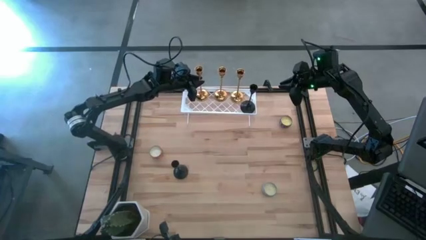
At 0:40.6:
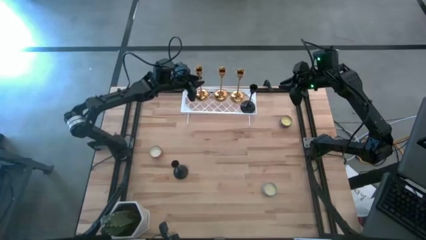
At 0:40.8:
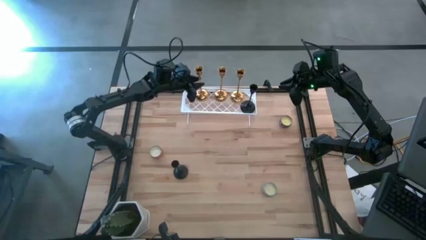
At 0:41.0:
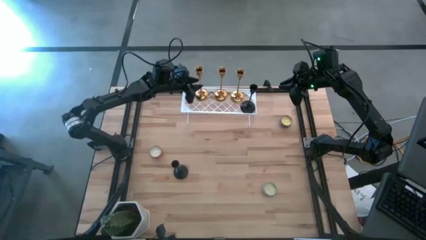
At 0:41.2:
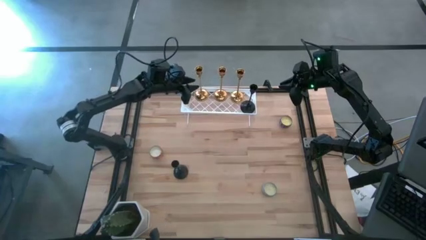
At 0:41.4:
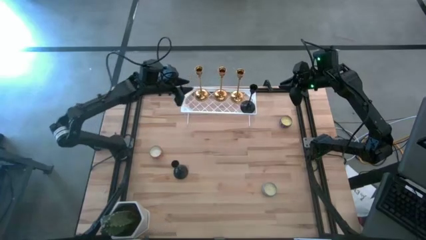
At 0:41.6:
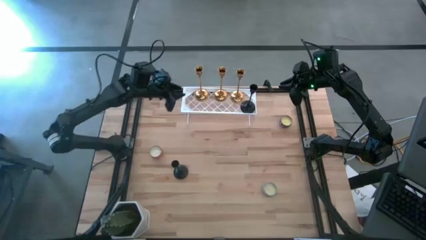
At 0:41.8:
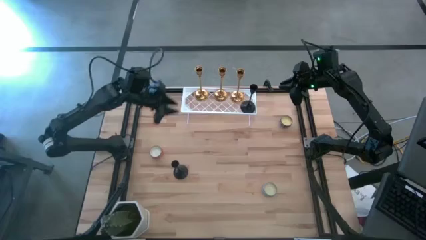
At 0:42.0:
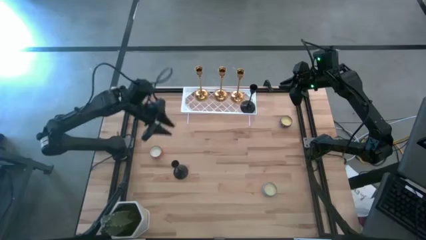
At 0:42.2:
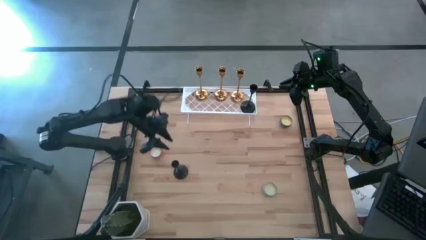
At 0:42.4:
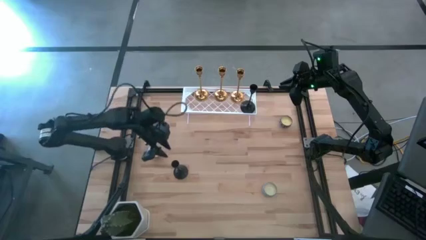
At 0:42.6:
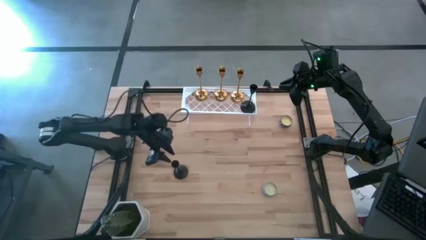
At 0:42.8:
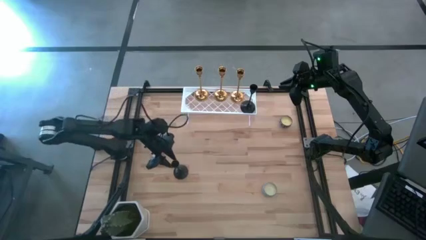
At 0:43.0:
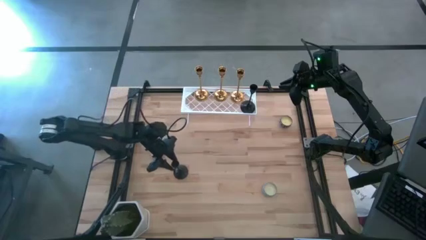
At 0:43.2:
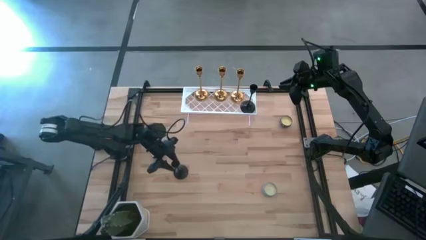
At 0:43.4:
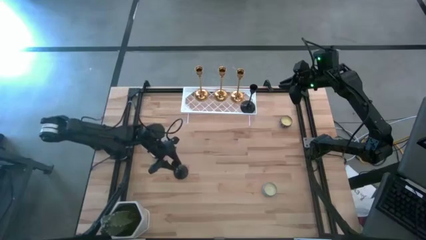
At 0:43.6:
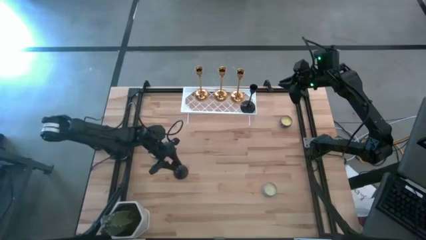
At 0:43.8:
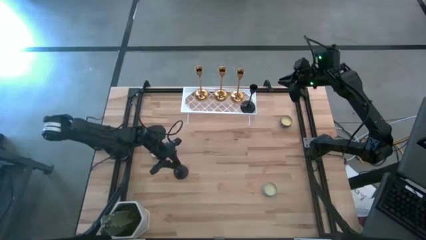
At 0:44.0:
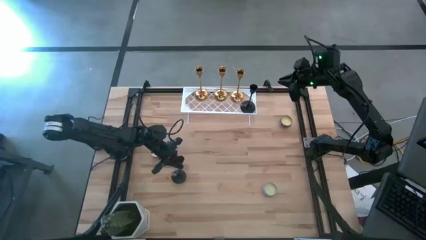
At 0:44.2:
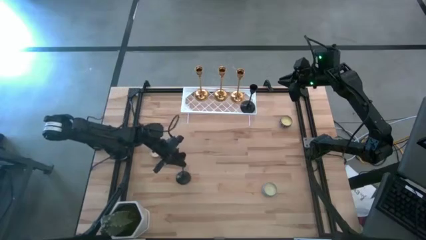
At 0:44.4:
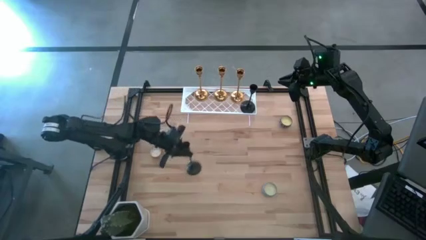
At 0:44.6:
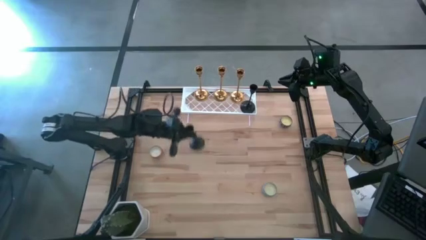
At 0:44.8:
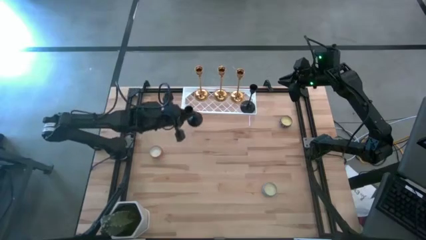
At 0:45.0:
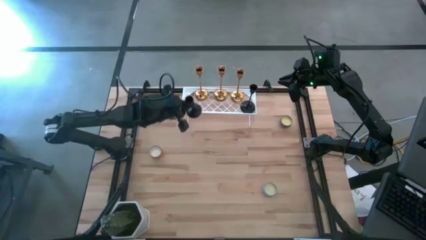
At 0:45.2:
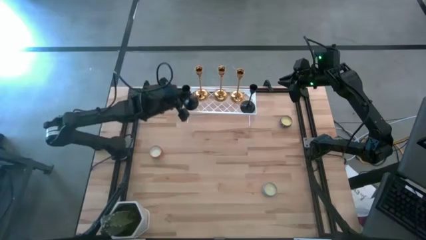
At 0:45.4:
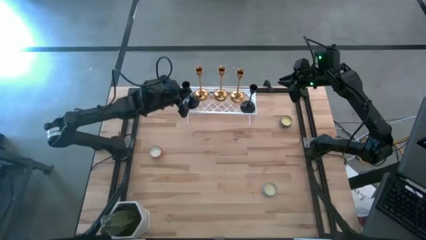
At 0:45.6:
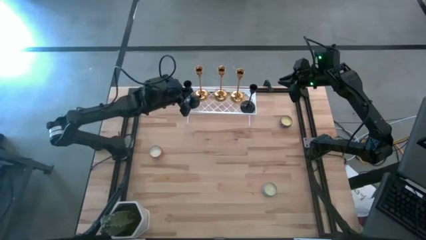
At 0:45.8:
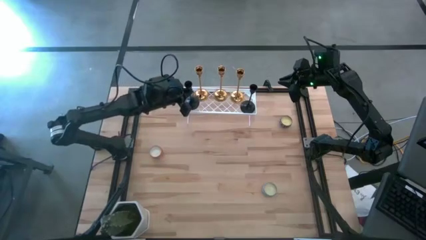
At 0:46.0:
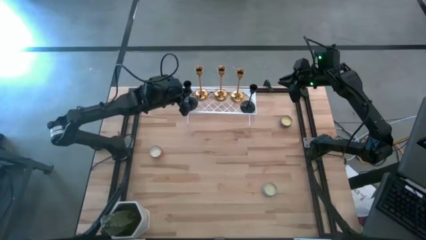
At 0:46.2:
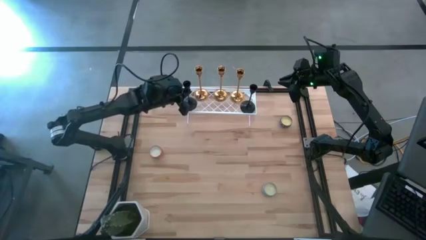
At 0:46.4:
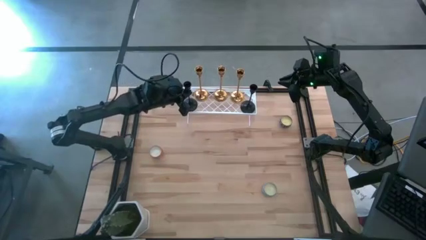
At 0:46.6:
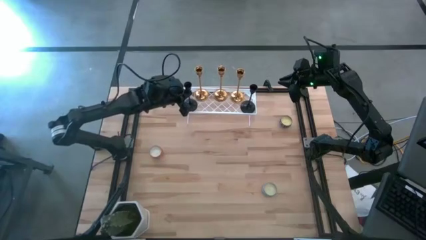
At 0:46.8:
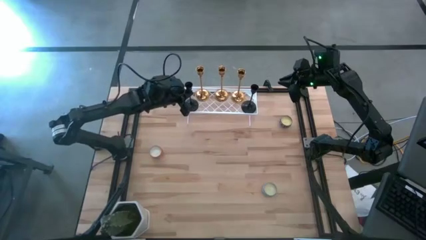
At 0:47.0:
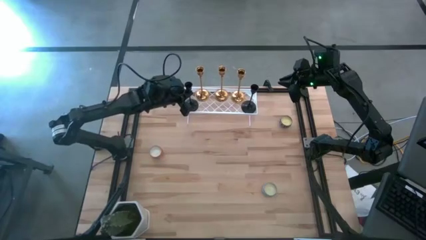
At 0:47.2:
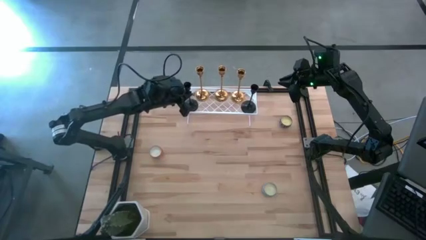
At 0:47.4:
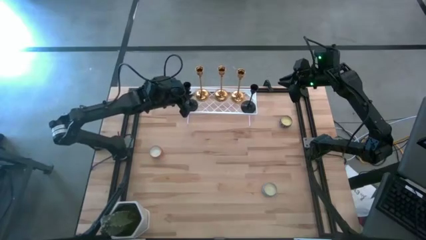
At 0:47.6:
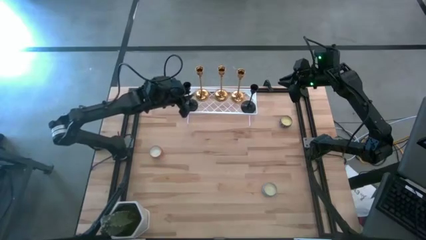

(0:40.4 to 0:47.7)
Task: Pick & Place candle stick holders
Put the black candle holder on the shelf

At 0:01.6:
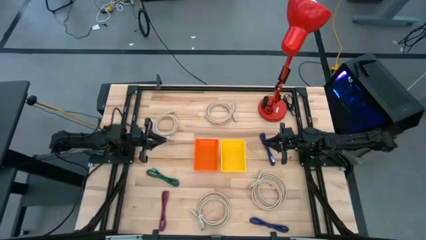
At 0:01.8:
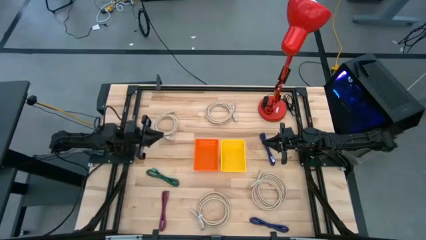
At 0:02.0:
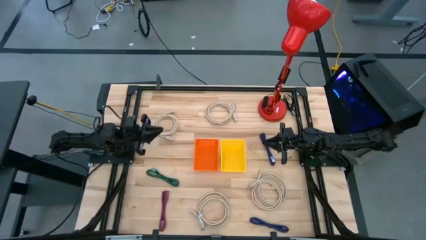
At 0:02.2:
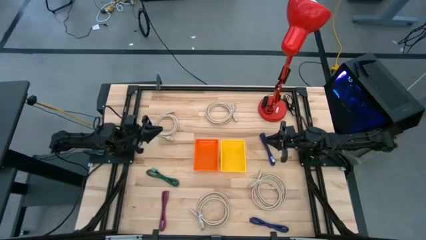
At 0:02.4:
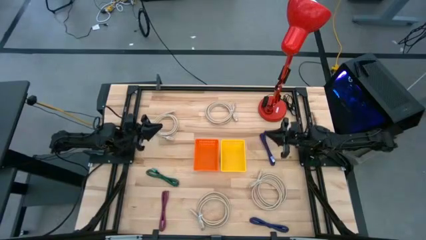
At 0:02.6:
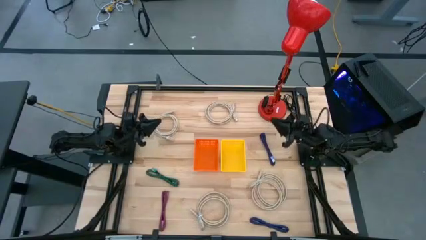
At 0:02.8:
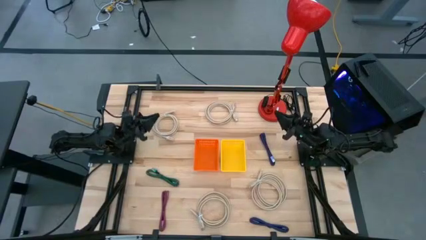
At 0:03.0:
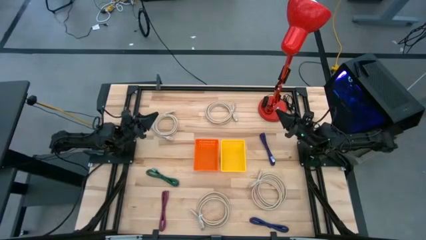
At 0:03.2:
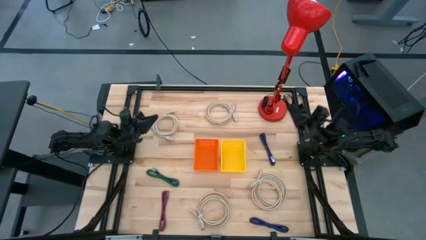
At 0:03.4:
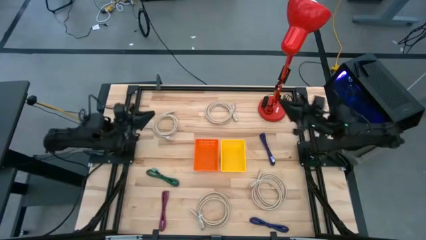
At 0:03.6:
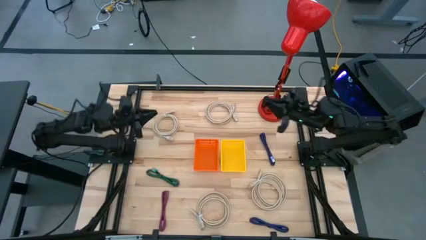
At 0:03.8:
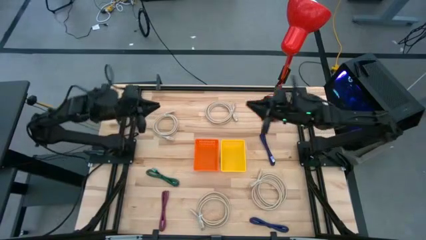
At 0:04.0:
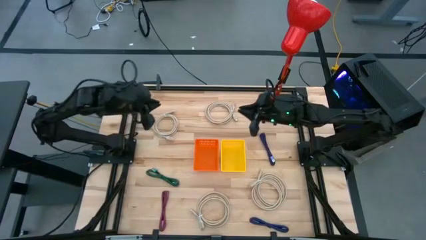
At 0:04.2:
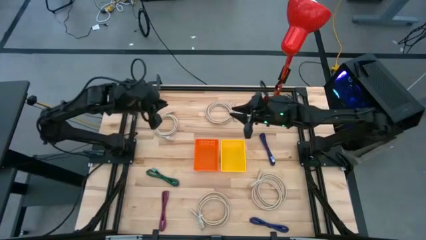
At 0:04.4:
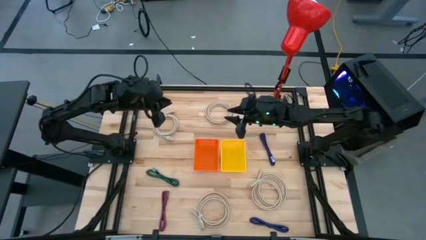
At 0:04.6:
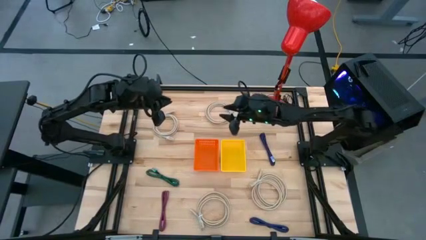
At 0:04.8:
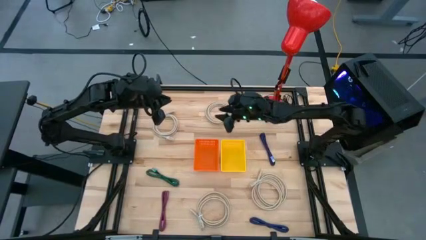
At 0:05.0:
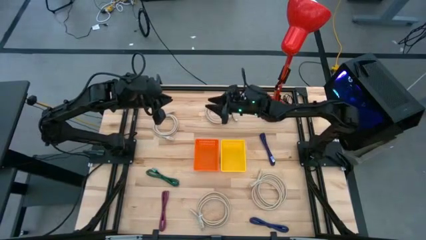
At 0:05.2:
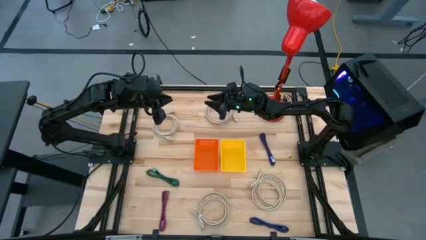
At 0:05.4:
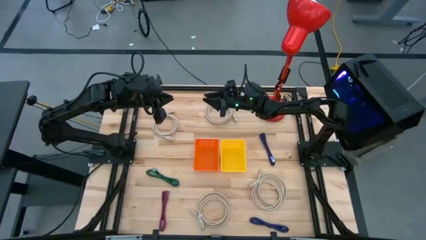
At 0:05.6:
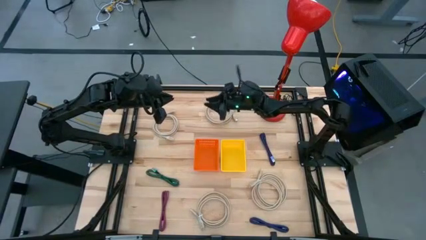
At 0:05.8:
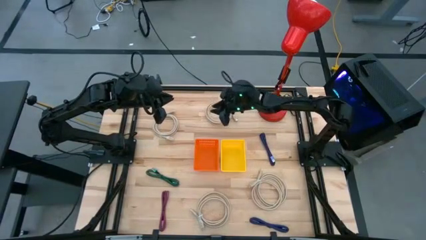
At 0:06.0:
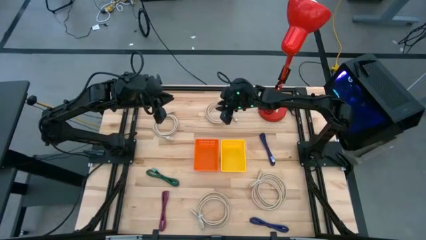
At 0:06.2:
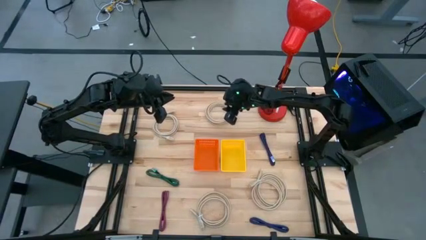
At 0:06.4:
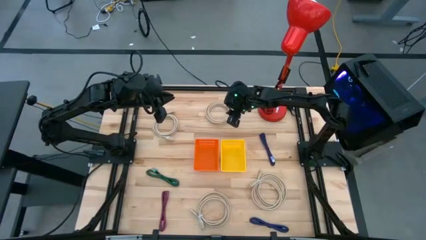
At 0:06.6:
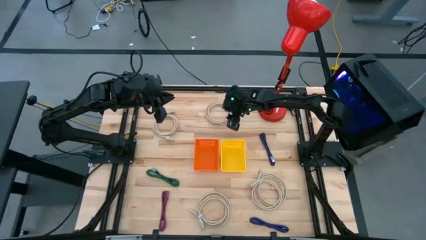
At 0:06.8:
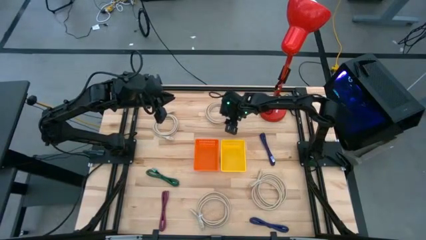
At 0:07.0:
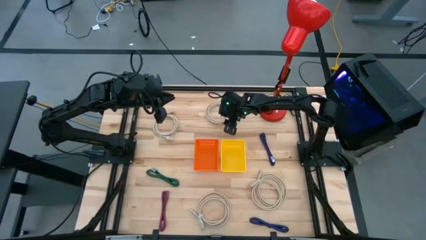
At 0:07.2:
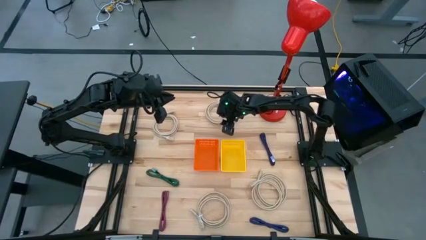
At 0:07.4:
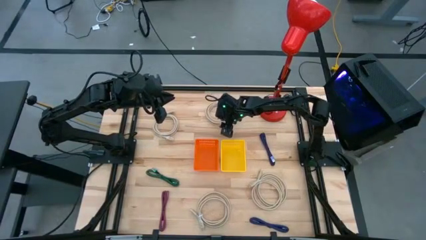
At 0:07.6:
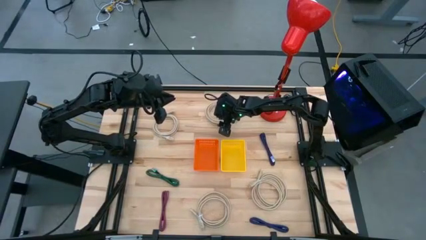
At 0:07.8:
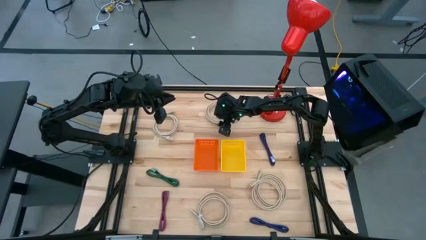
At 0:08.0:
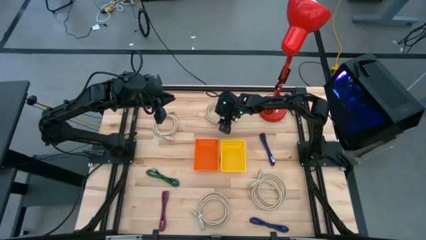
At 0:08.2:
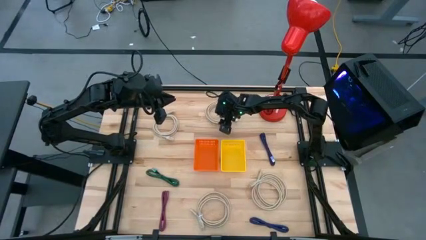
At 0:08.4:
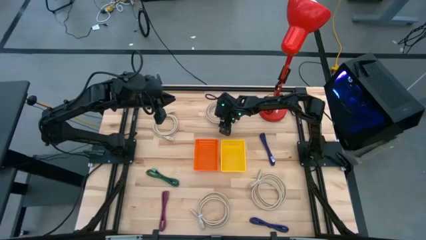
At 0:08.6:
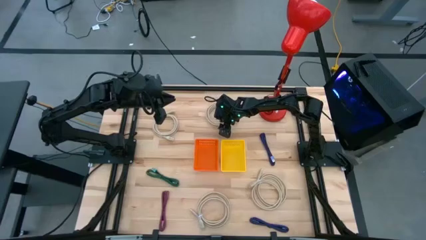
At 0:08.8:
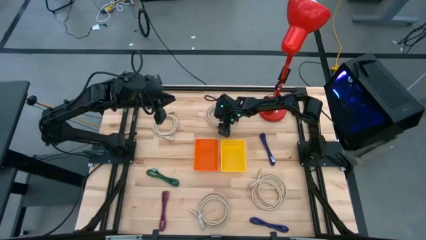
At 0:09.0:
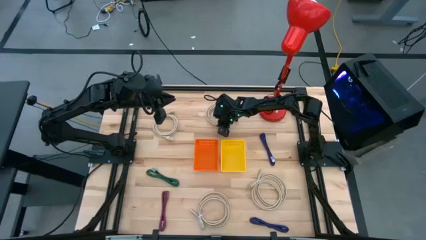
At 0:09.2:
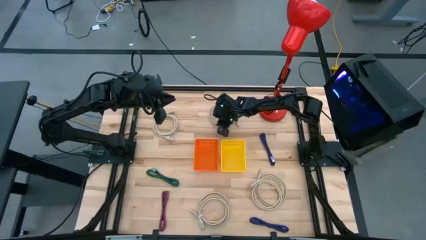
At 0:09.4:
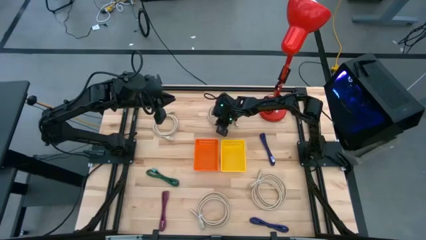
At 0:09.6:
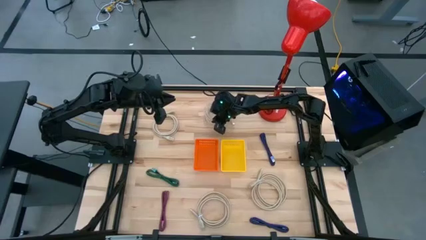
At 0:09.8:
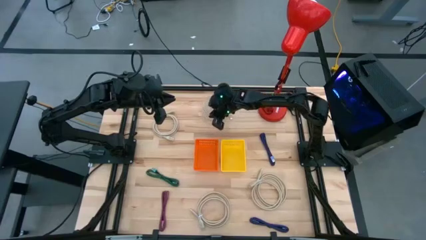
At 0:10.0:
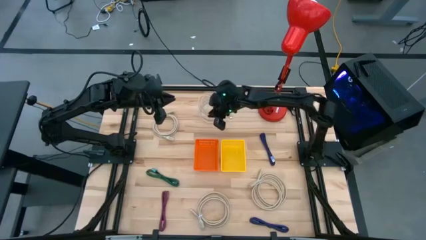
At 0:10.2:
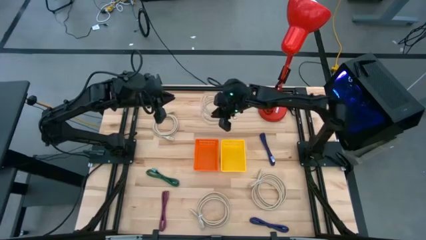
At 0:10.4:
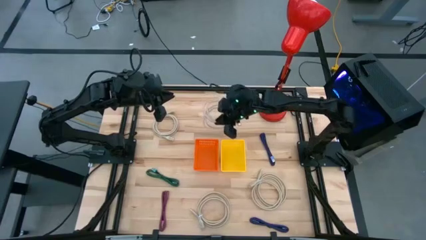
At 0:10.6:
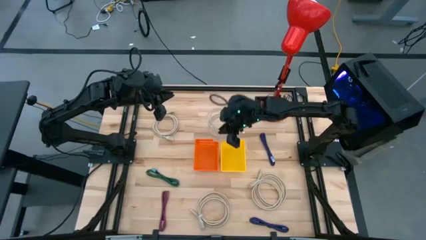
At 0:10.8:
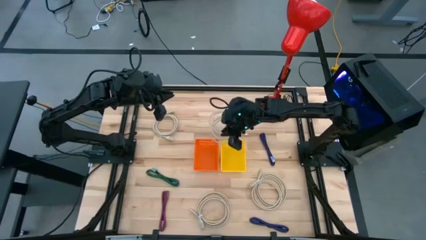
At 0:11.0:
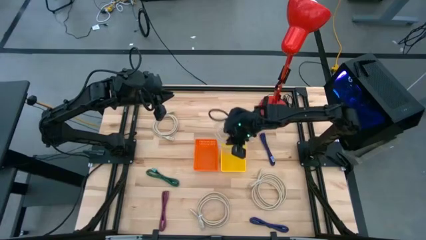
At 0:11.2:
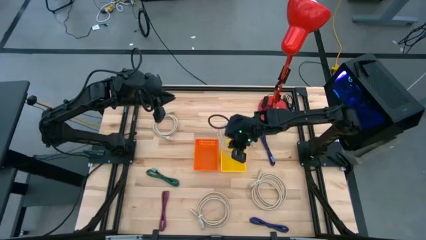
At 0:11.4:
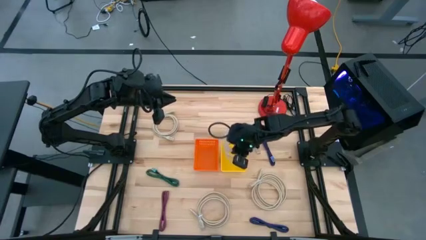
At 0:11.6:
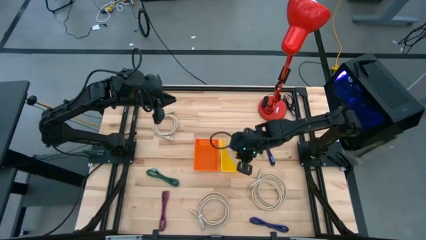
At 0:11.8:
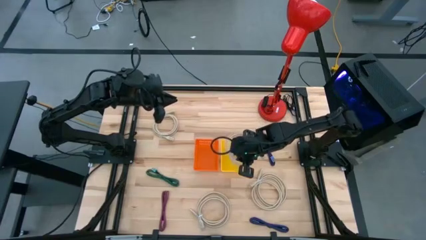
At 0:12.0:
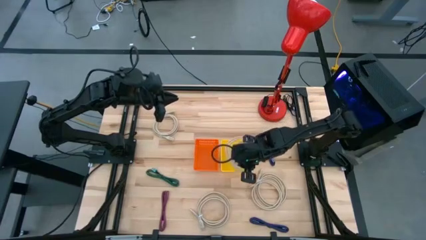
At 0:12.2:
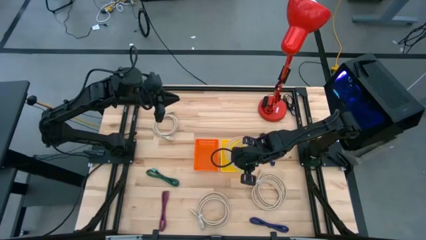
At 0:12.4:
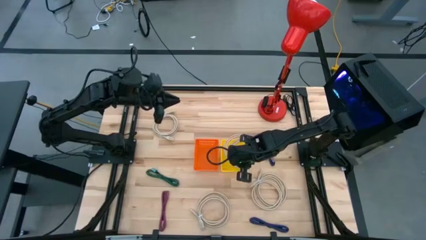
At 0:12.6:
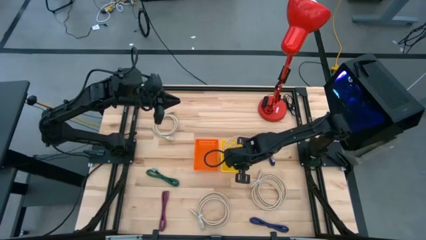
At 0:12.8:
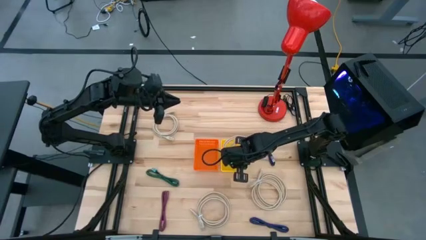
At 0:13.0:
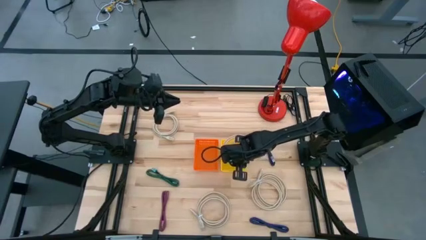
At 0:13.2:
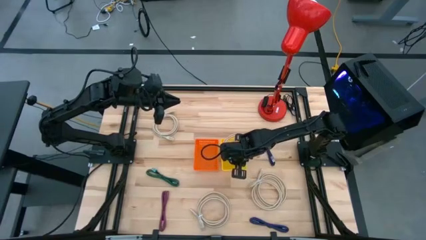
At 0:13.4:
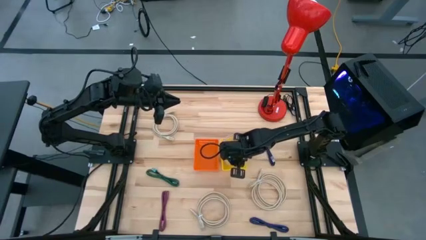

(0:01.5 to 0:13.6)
Task: Pick & Place USB Port
Put the brown HDMI cable into the yellow bin
